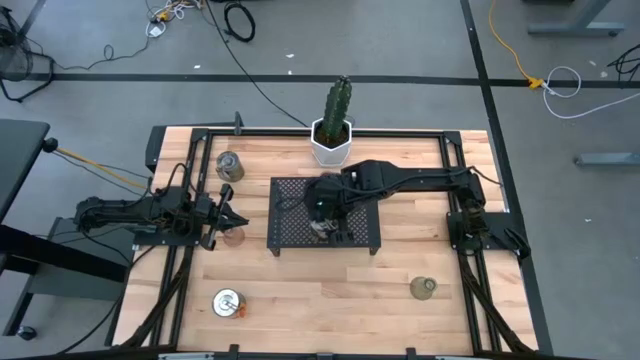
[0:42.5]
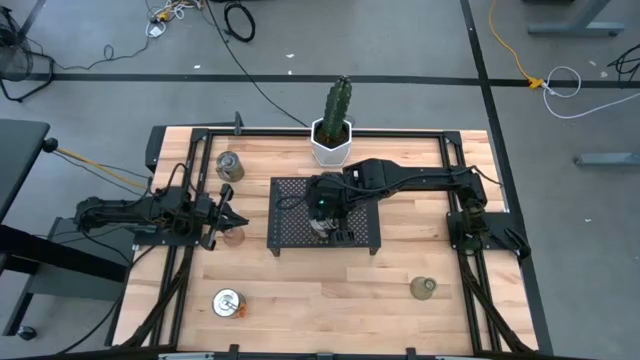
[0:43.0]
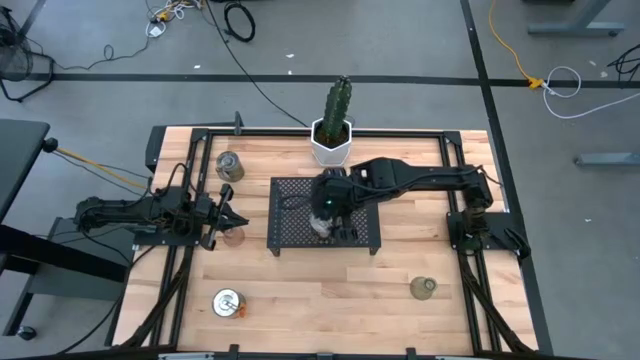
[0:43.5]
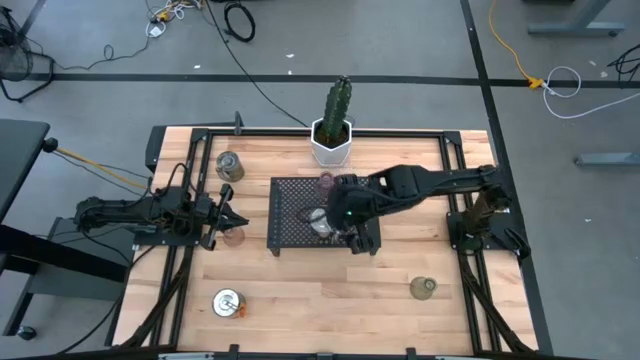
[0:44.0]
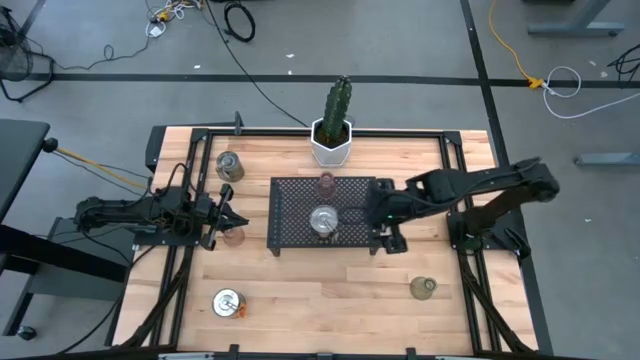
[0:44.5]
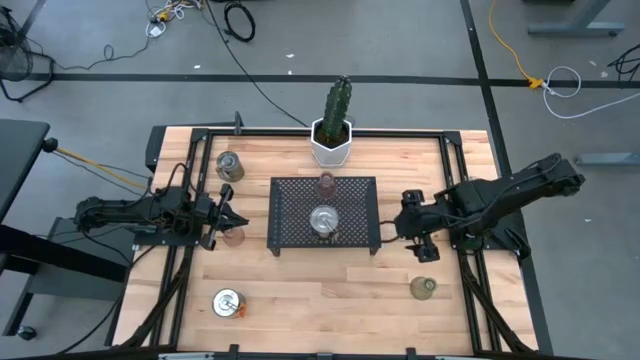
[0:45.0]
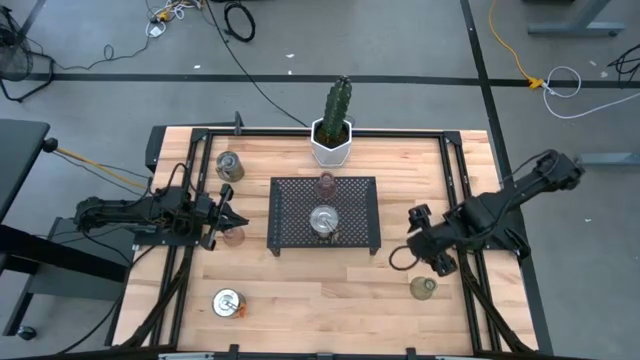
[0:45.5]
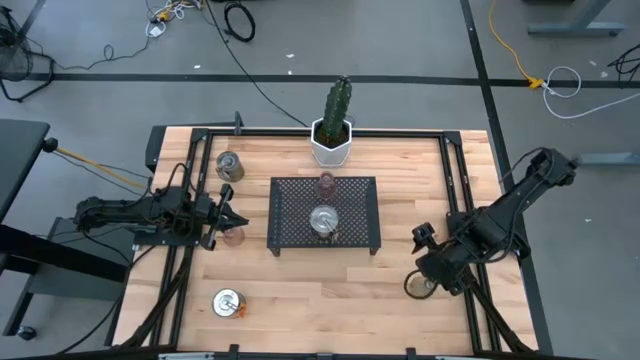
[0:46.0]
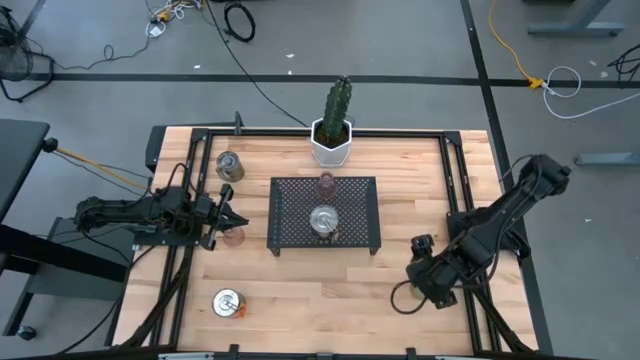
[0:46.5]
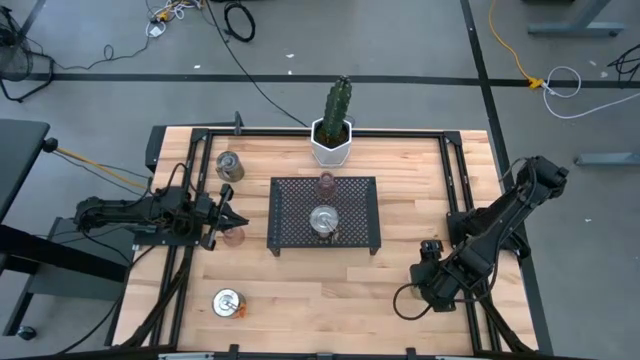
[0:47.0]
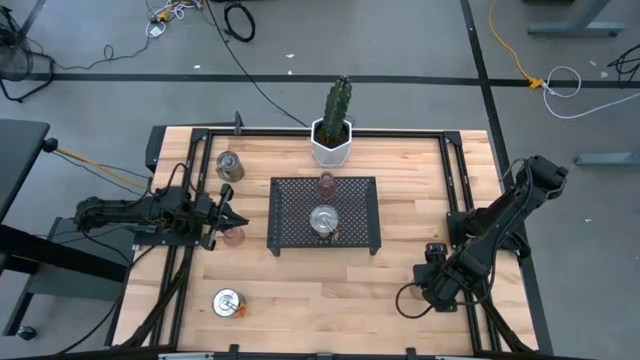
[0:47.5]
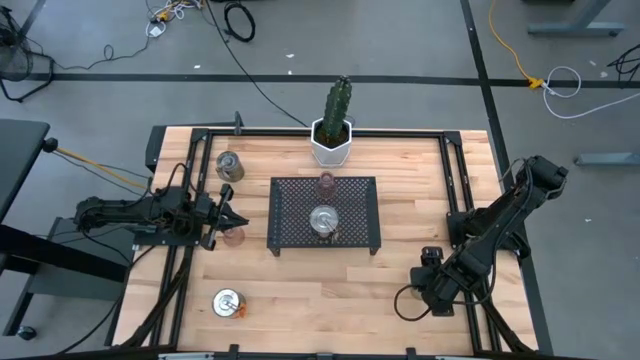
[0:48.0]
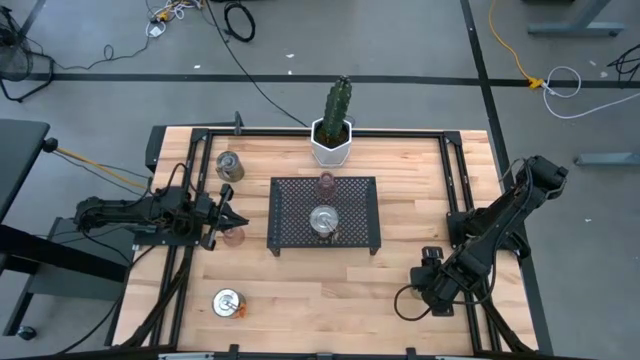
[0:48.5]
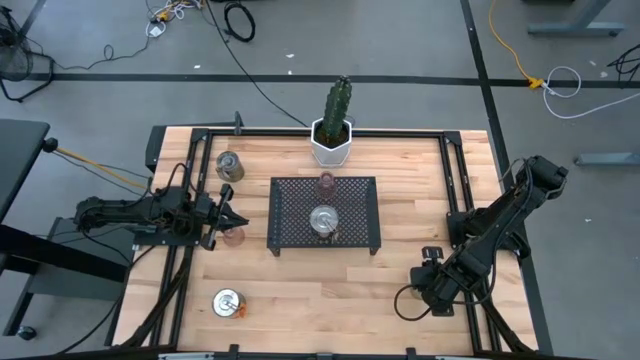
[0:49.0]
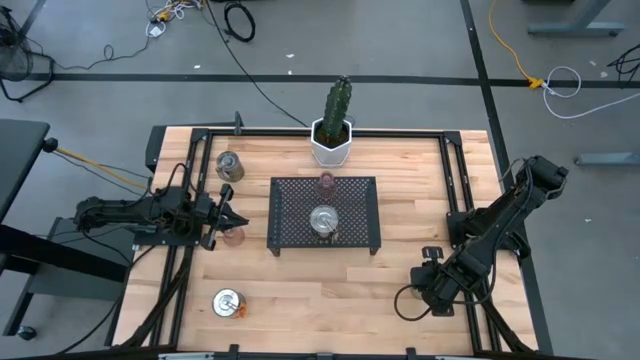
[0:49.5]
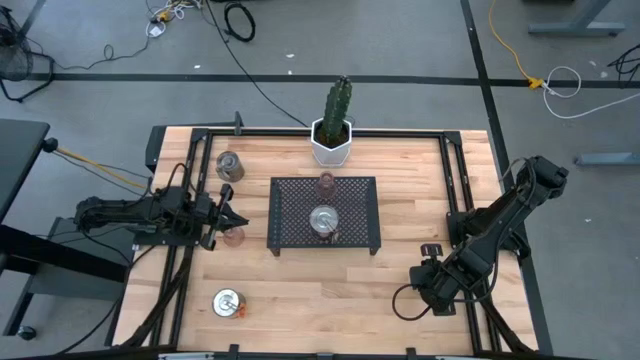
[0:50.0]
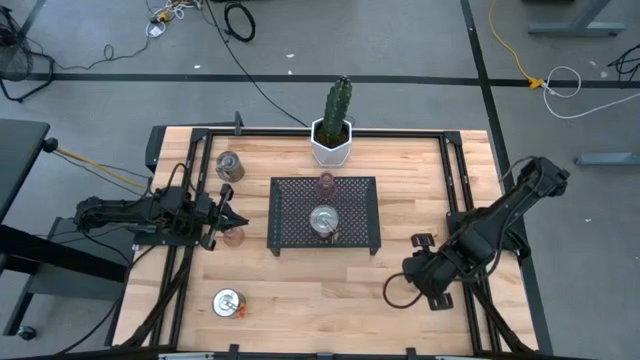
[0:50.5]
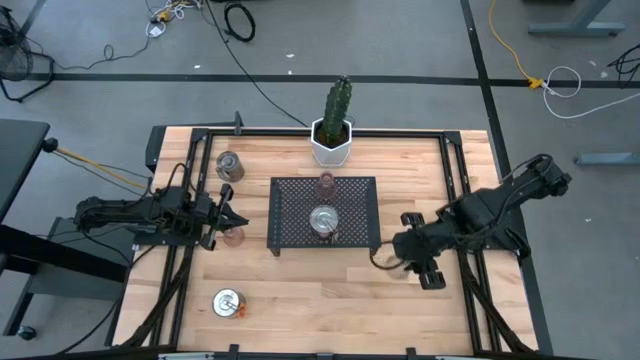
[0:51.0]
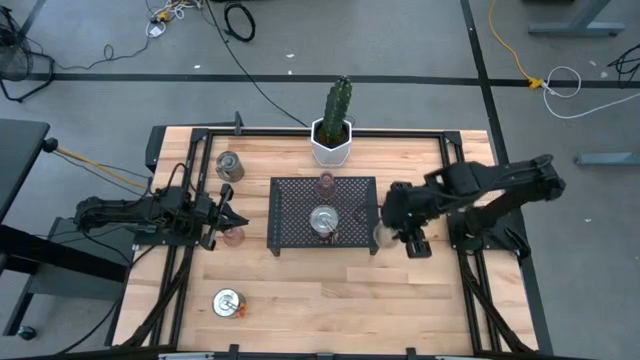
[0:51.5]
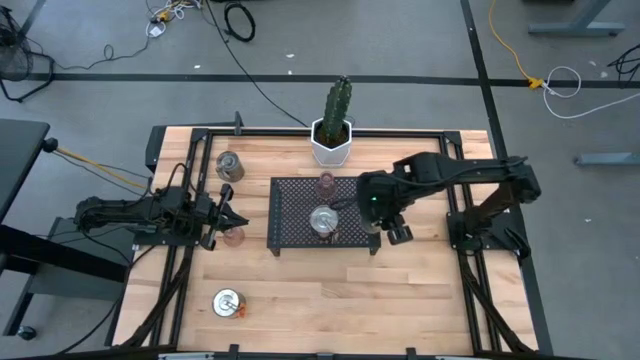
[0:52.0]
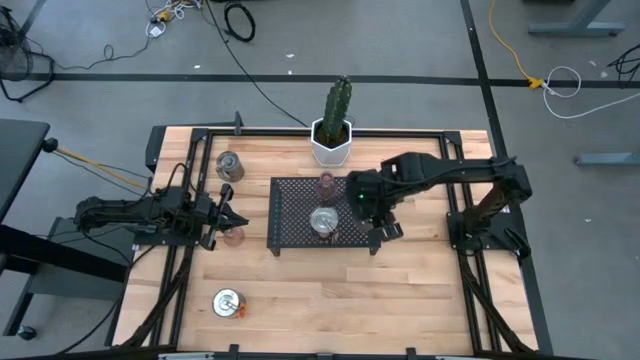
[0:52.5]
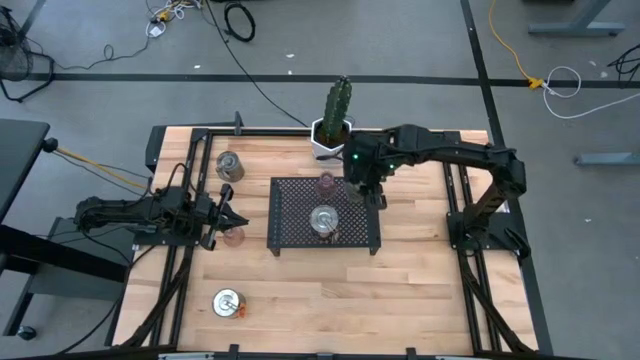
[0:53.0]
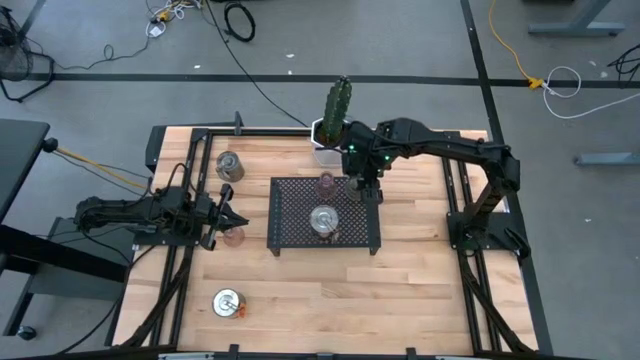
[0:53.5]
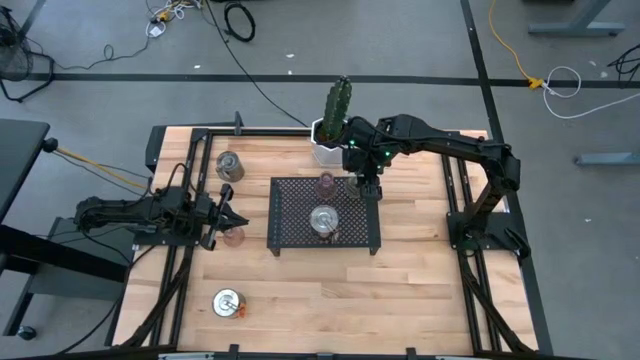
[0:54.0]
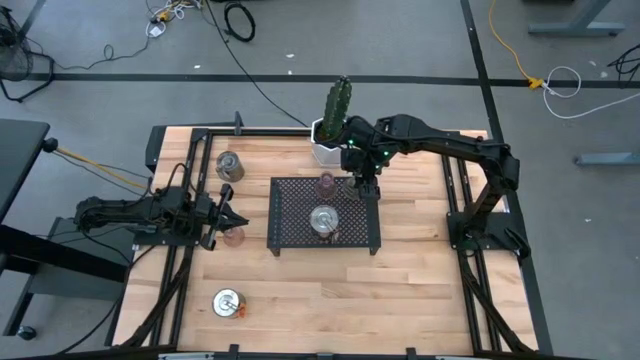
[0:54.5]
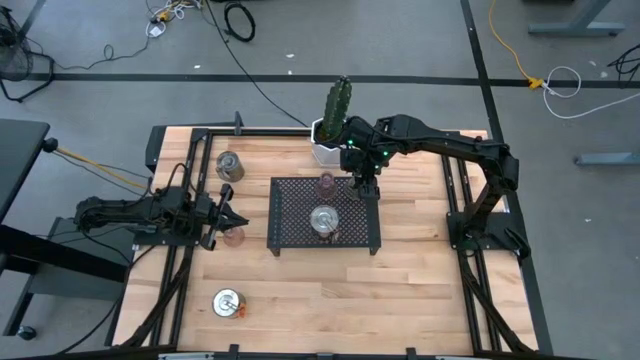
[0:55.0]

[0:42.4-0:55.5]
Task: Pick & Place candle stick holders
Put the green glass candle holder on the shelf
